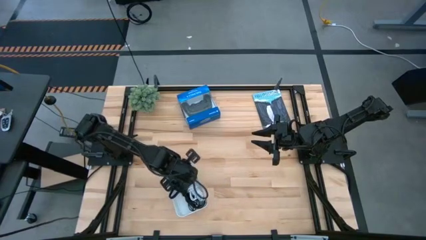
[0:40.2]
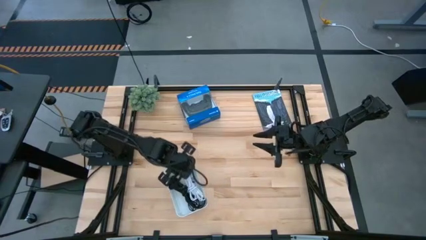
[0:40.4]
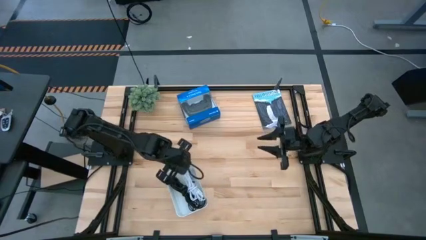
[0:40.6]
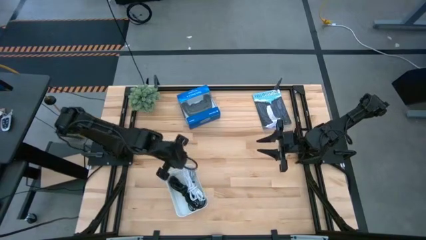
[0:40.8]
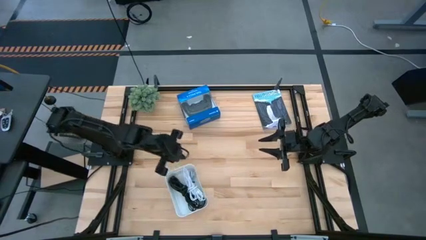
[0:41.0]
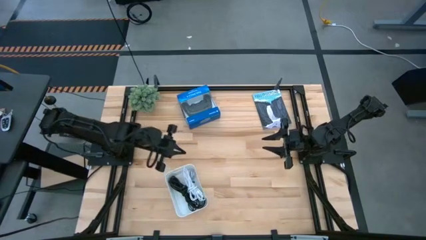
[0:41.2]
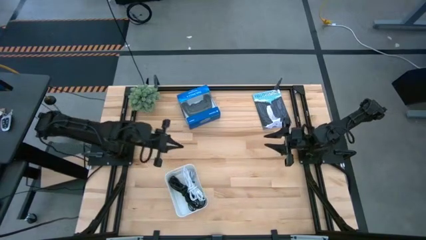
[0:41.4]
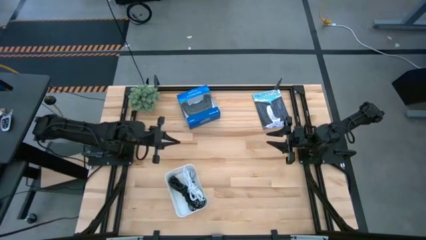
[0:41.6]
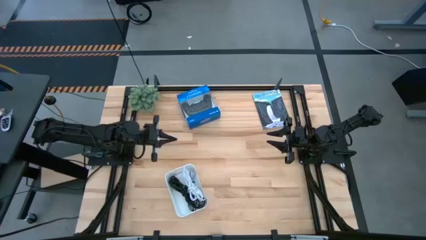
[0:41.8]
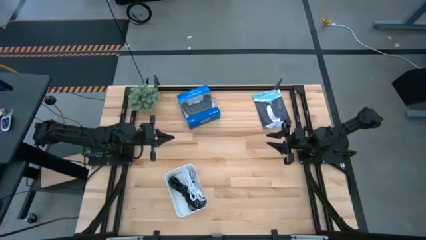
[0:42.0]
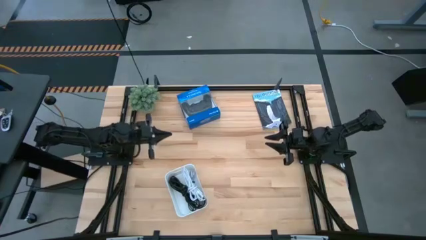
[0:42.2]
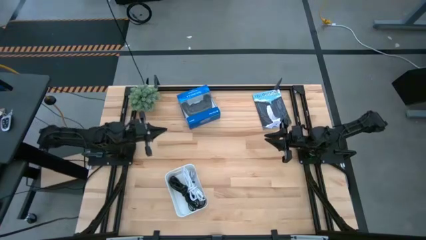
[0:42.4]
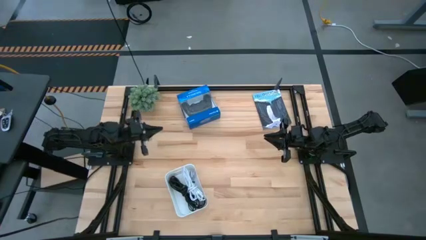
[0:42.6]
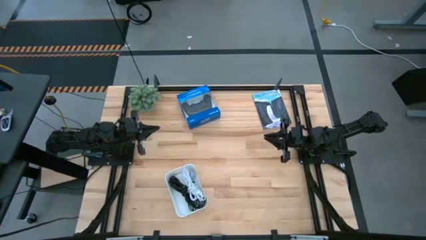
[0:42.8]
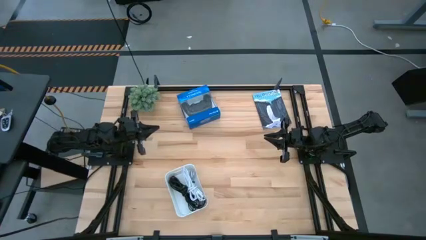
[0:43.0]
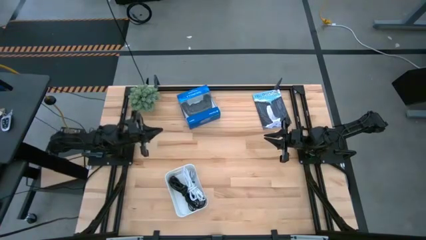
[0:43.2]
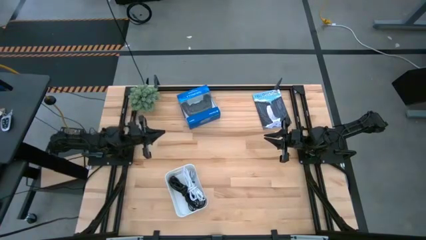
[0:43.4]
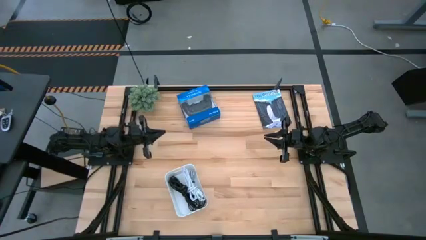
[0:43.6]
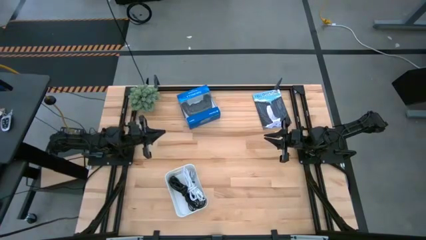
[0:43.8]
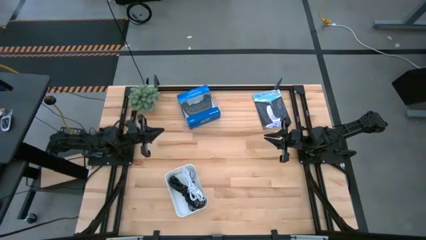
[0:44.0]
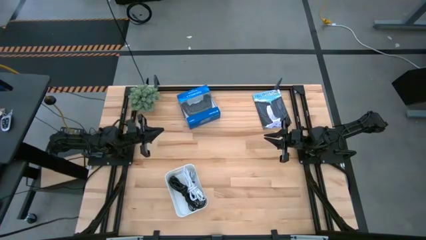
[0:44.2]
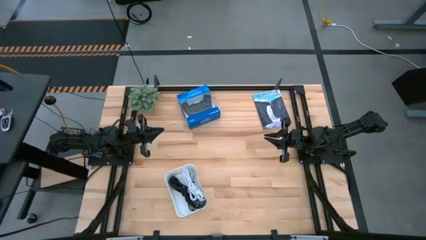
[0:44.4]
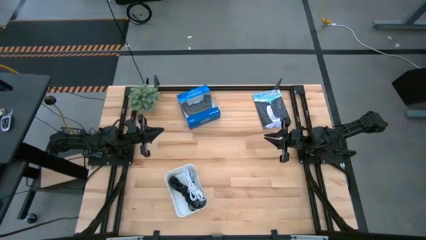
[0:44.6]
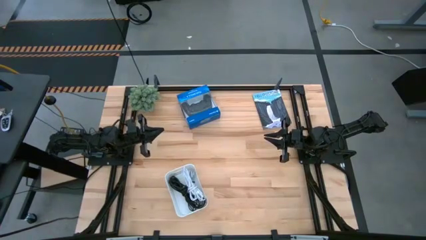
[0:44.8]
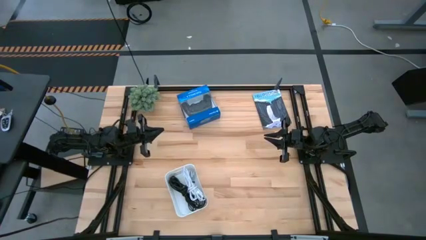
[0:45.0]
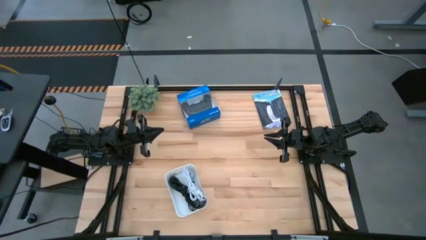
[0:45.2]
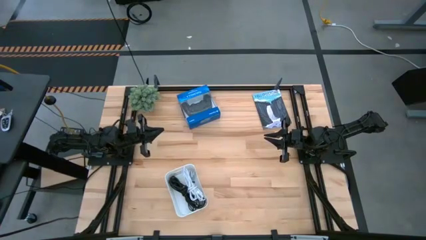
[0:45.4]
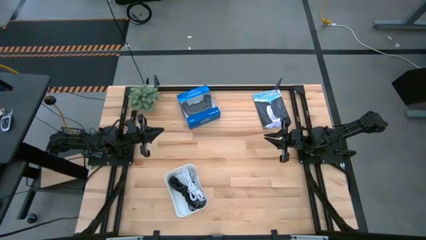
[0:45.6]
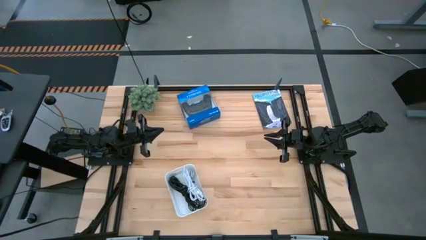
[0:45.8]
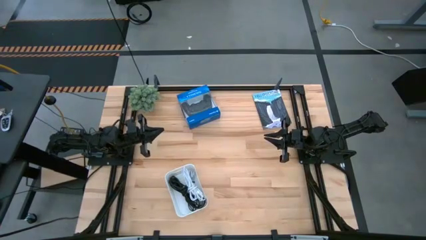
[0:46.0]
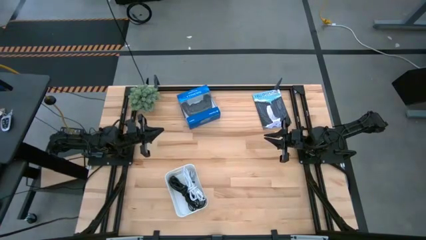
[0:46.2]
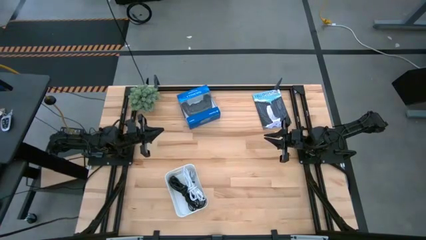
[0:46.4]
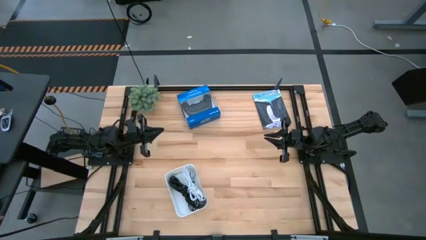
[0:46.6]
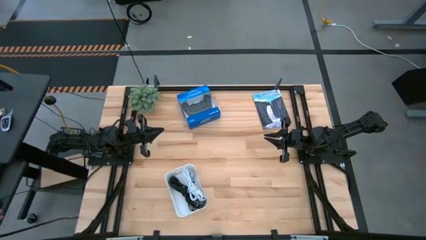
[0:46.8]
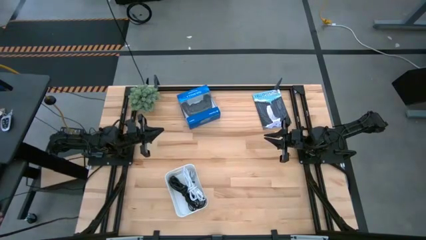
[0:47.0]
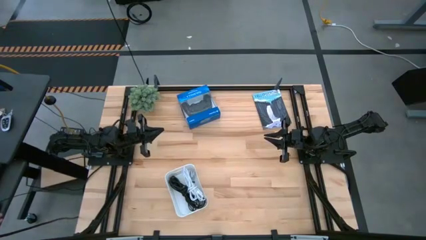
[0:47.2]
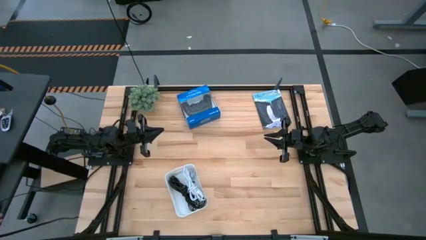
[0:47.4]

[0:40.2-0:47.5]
Task: Pick and place USB-C Cables
Return to Home Position

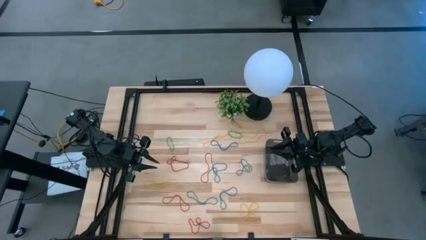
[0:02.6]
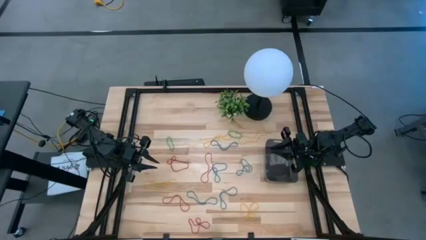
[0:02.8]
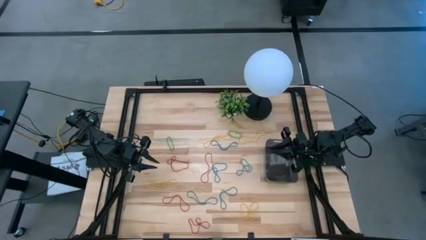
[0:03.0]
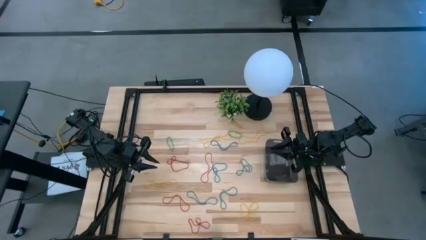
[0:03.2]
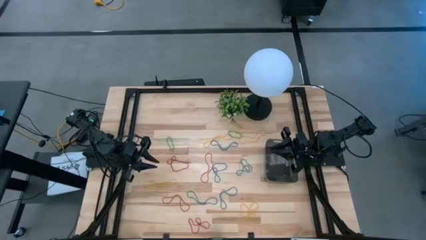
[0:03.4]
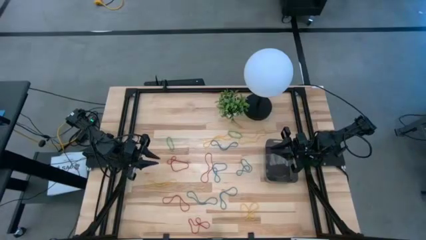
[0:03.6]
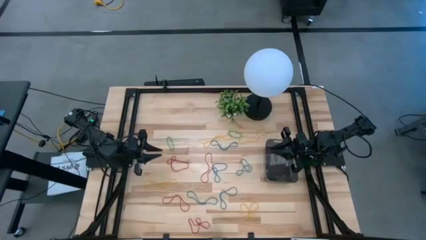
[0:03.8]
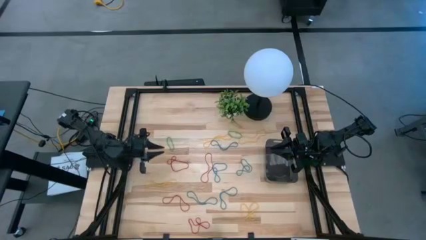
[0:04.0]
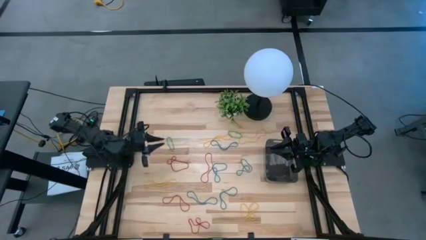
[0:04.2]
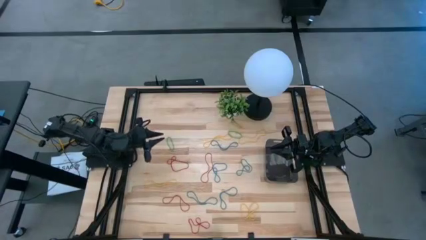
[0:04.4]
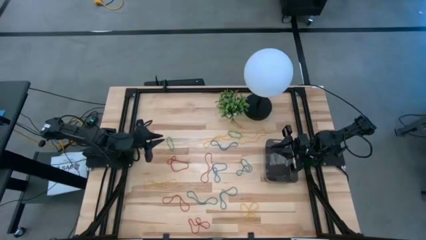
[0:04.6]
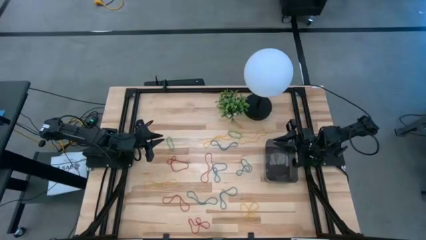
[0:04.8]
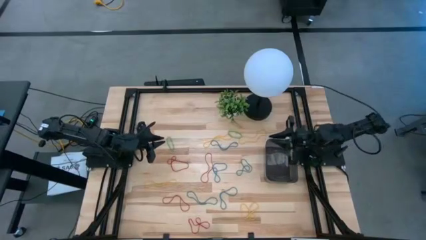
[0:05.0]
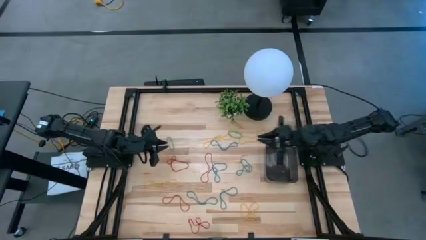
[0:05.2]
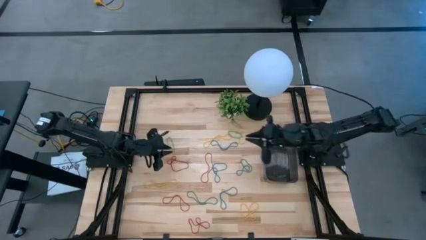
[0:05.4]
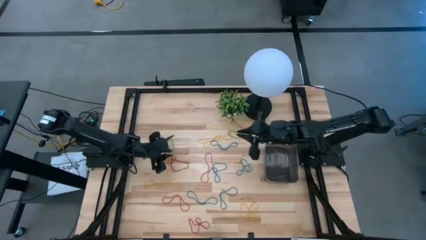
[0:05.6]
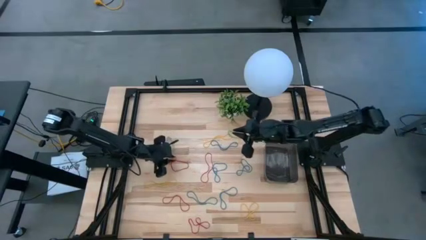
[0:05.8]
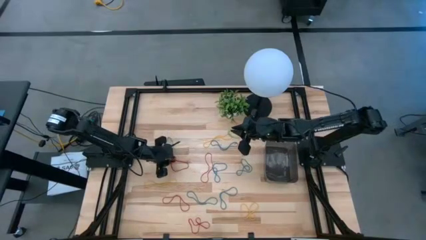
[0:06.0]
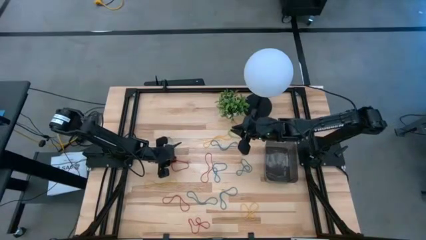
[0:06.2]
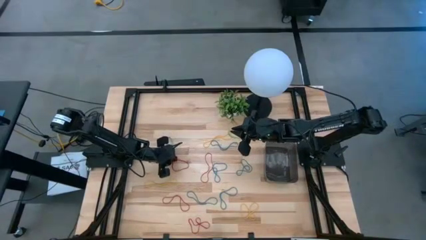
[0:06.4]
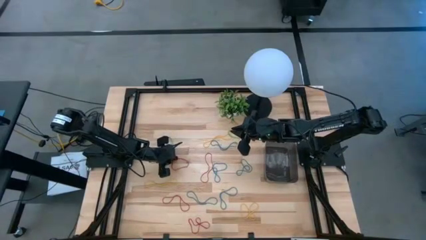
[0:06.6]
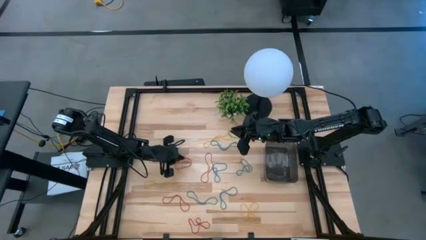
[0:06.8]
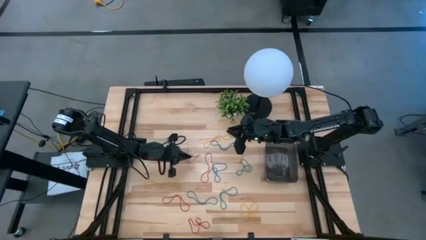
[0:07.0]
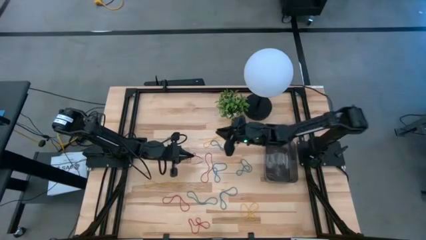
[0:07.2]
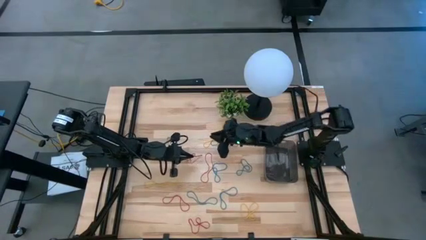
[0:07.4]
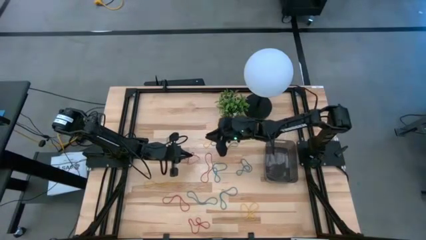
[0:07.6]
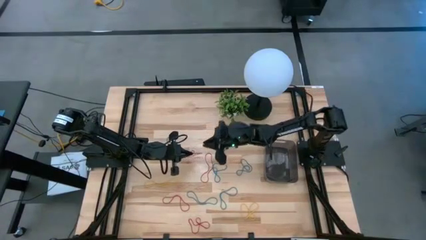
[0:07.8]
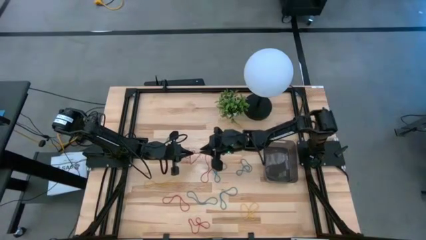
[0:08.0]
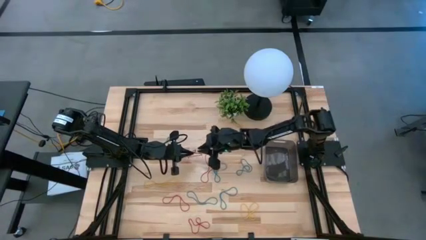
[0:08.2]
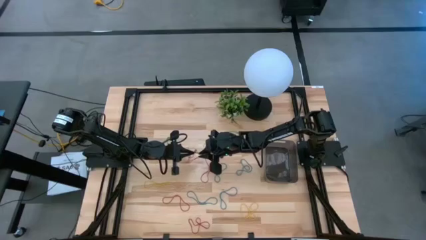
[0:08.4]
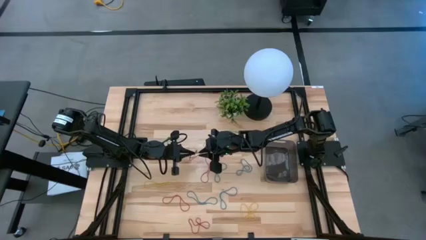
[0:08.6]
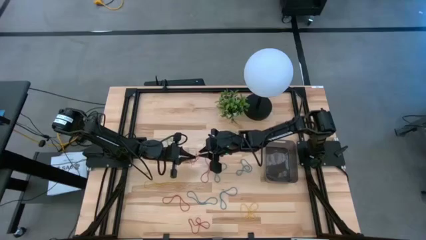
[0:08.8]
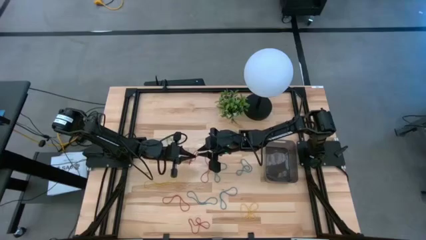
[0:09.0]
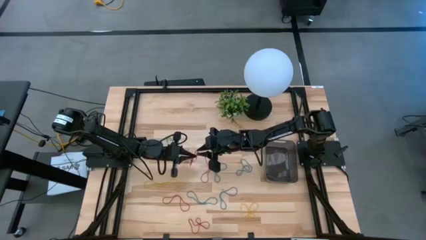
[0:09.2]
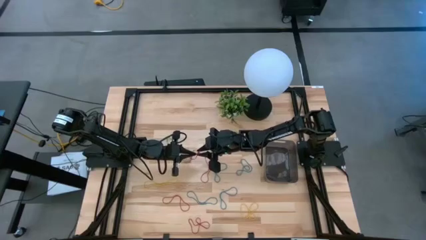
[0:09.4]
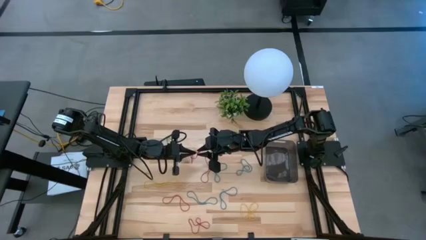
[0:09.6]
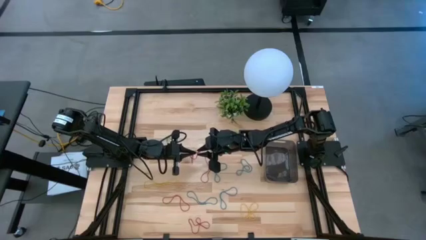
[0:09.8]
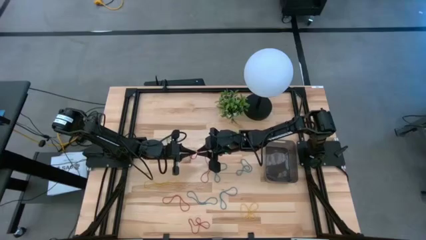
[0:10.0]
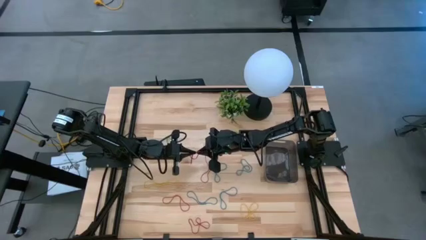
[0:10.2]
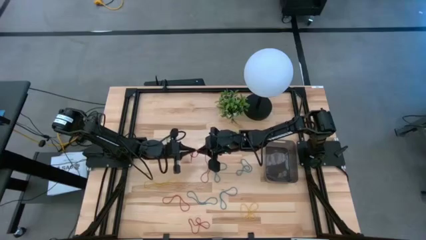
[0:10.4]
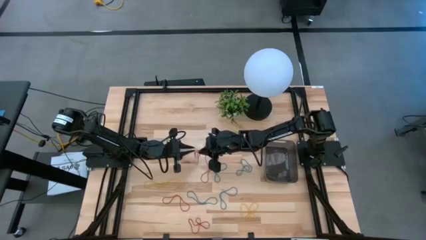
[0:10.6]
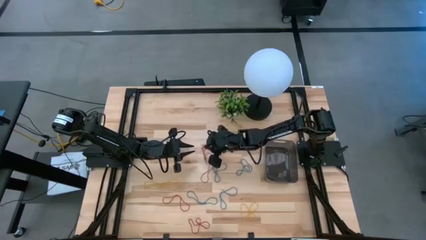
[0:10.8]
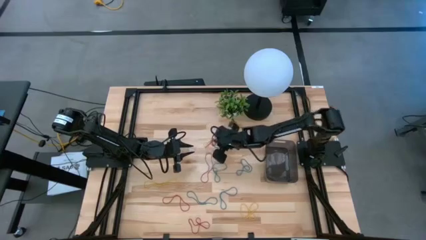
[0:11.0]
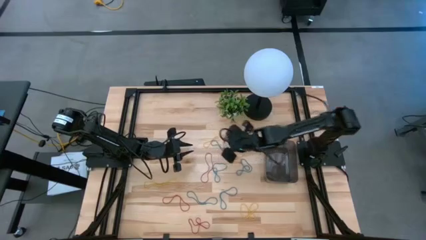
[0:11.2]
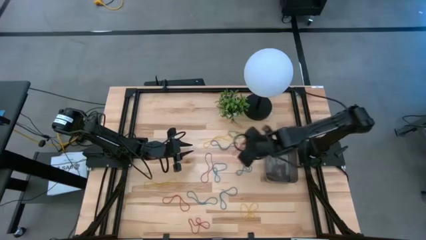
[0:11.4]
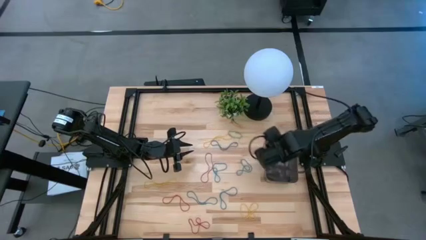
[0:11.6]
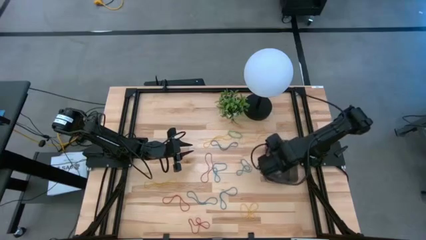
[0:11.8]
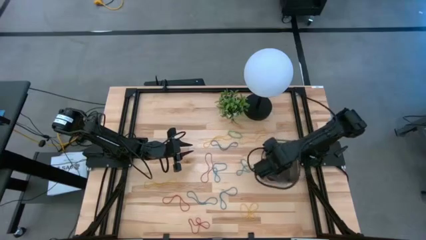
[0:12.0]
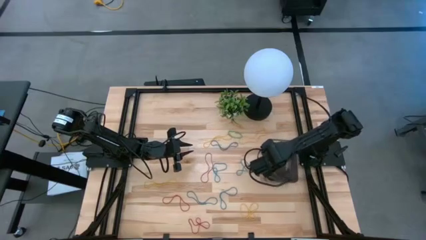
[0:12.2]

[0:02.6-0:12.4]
Task: Pick and place items into bin
Put the red rubber band into the black transparent bin
